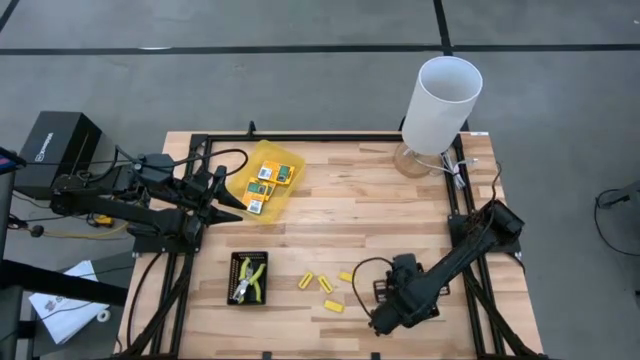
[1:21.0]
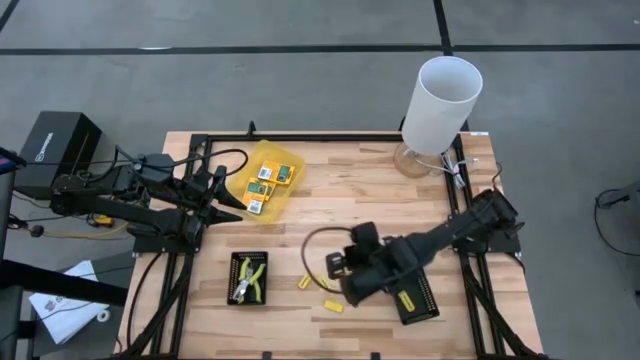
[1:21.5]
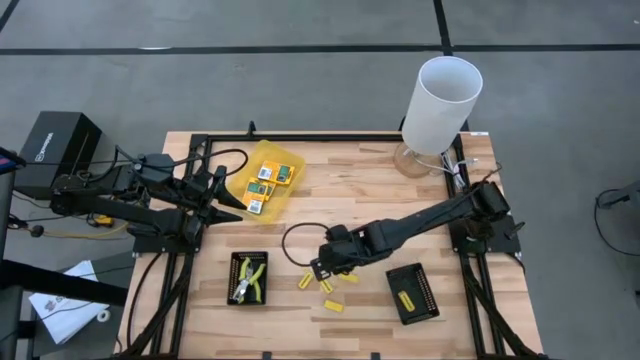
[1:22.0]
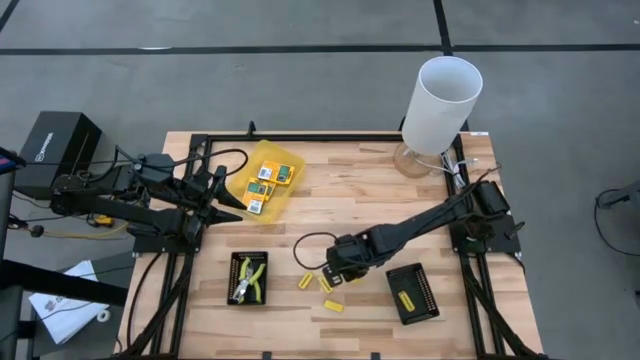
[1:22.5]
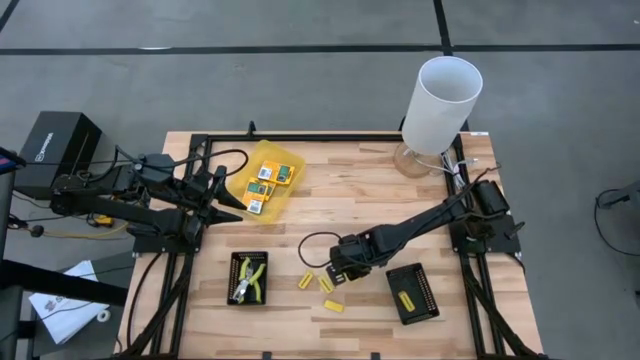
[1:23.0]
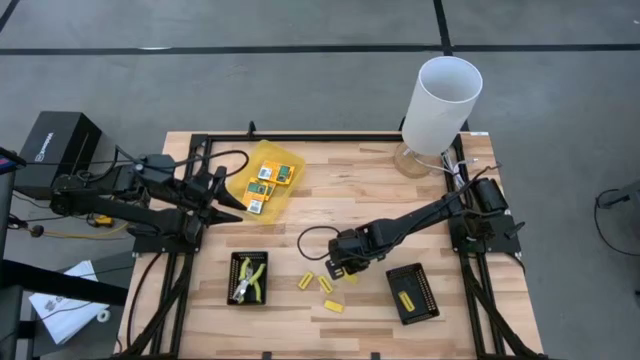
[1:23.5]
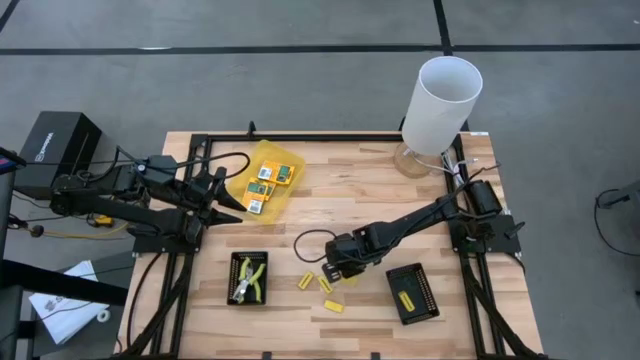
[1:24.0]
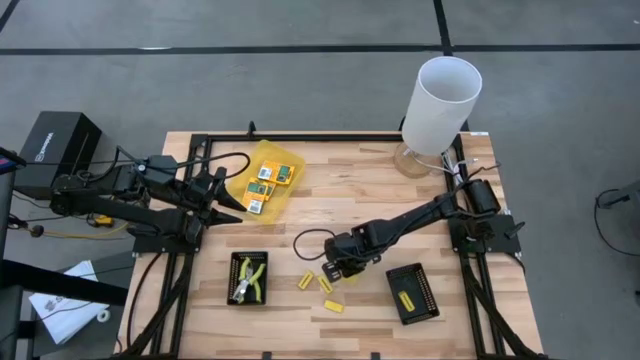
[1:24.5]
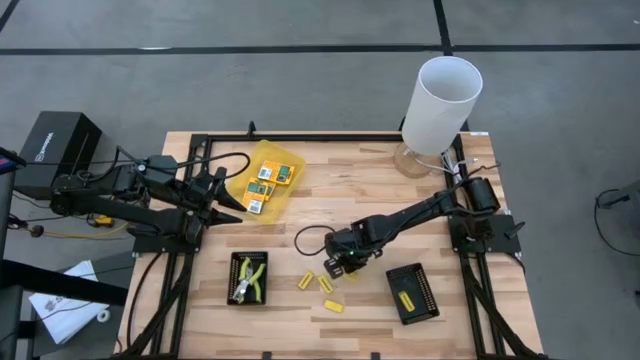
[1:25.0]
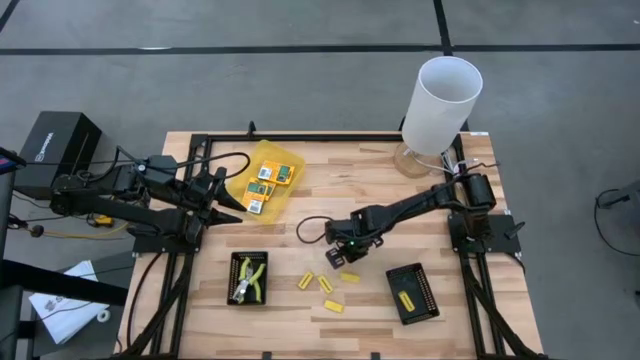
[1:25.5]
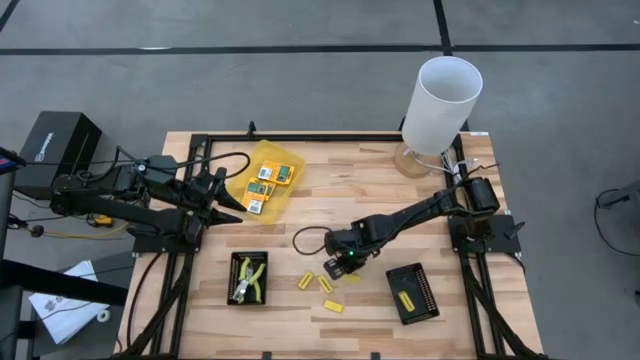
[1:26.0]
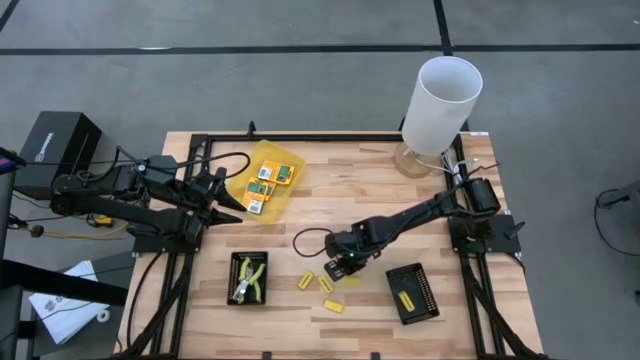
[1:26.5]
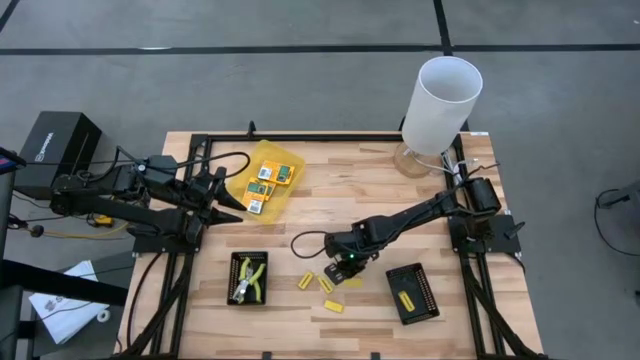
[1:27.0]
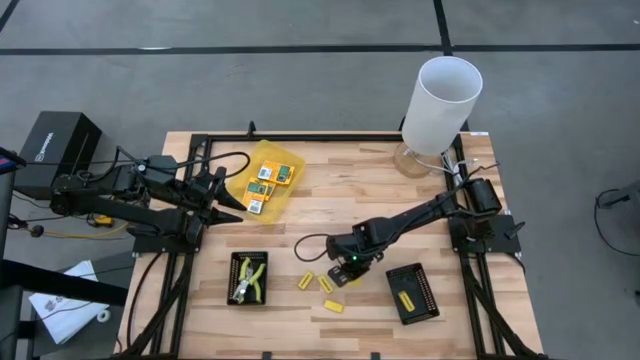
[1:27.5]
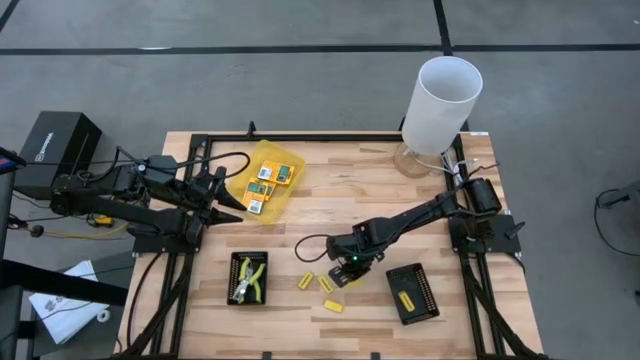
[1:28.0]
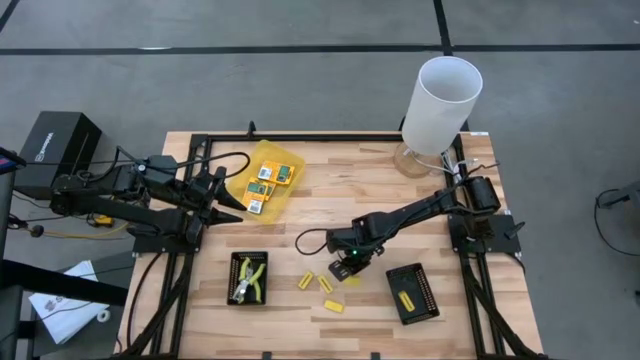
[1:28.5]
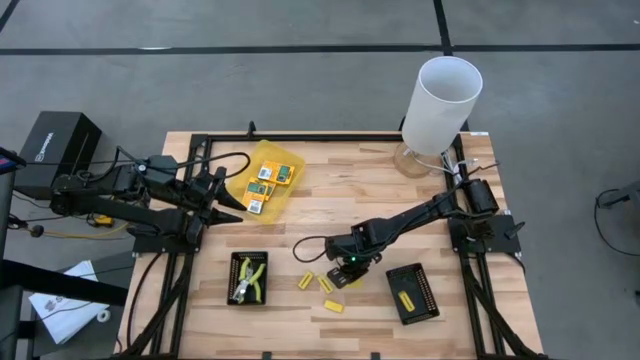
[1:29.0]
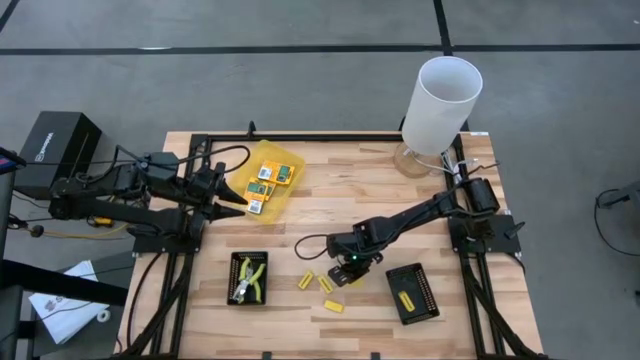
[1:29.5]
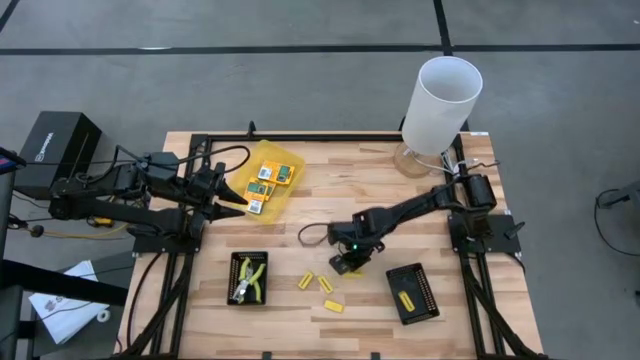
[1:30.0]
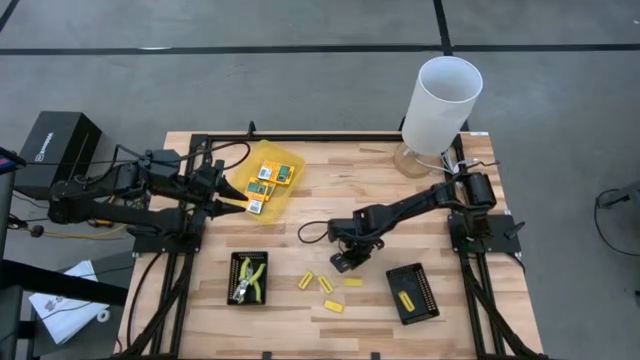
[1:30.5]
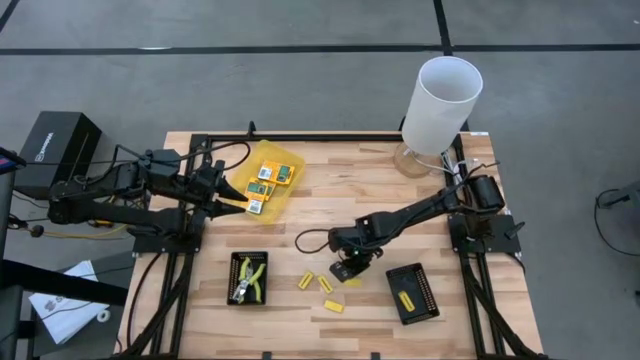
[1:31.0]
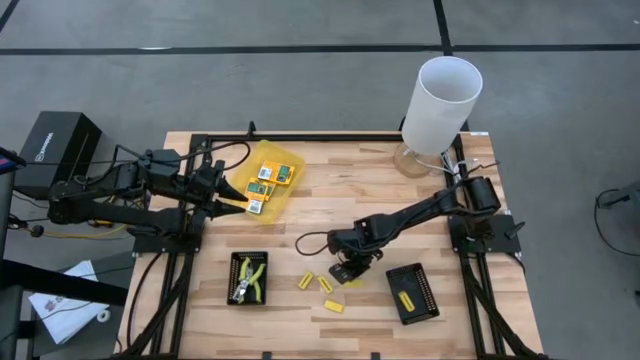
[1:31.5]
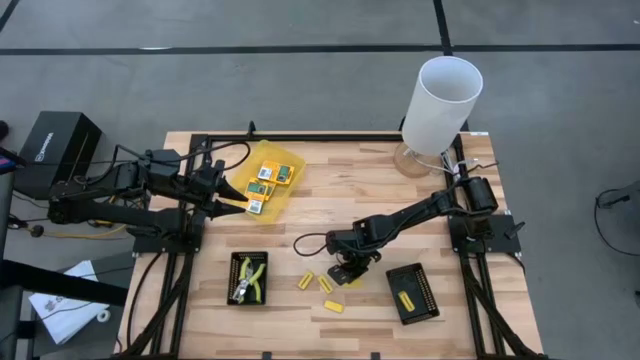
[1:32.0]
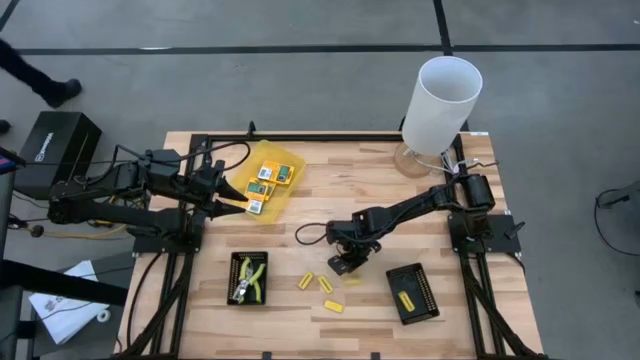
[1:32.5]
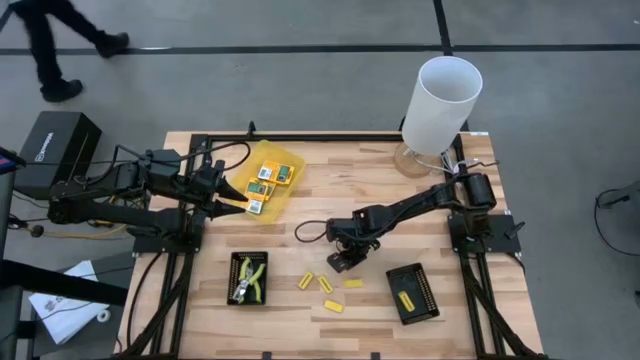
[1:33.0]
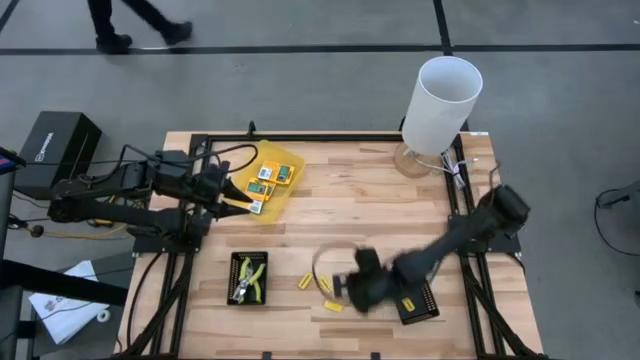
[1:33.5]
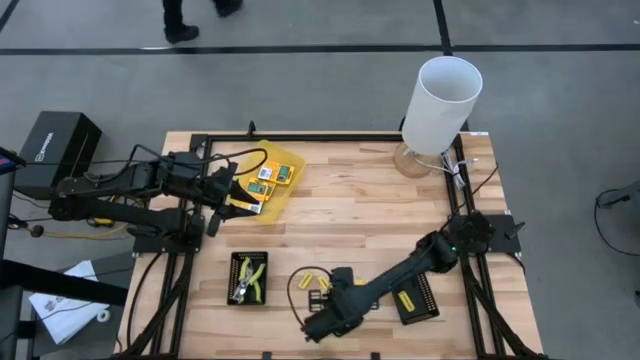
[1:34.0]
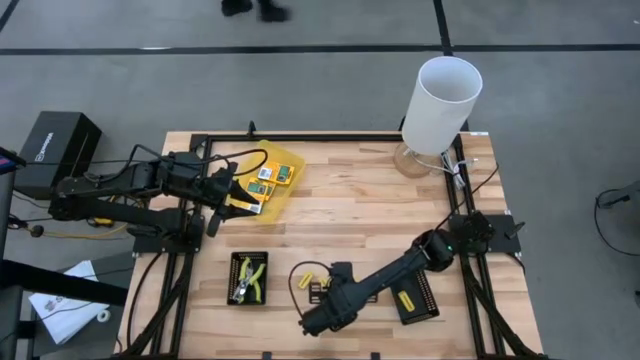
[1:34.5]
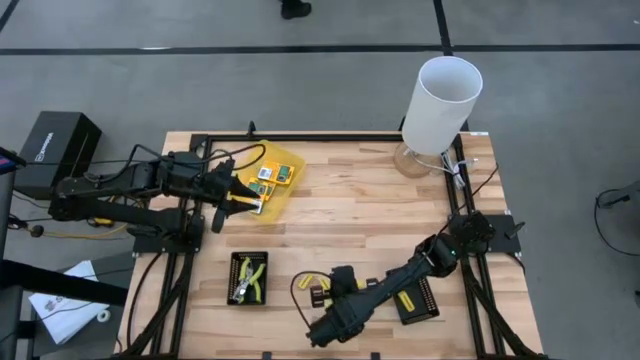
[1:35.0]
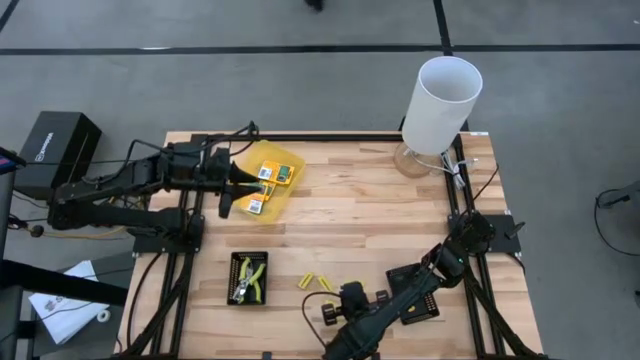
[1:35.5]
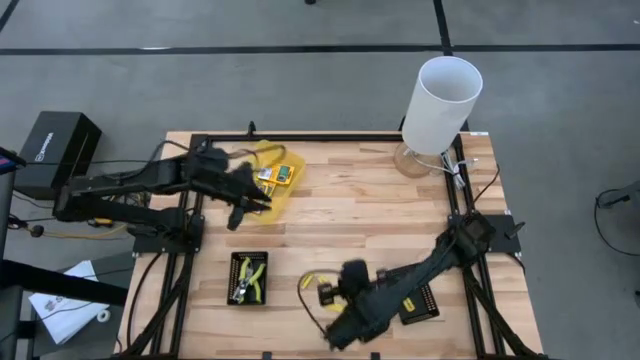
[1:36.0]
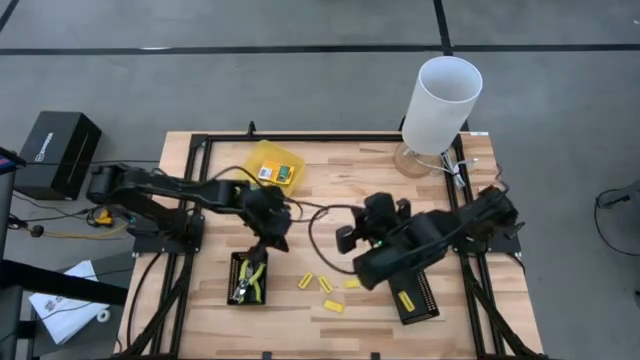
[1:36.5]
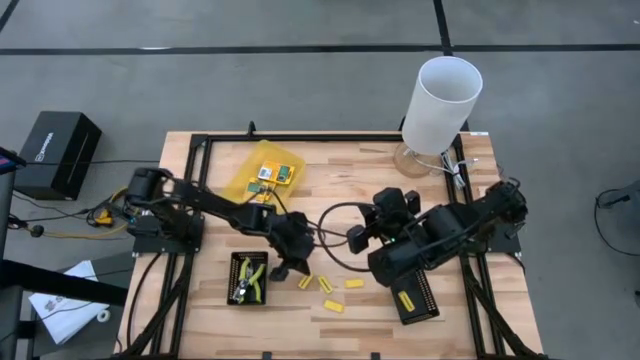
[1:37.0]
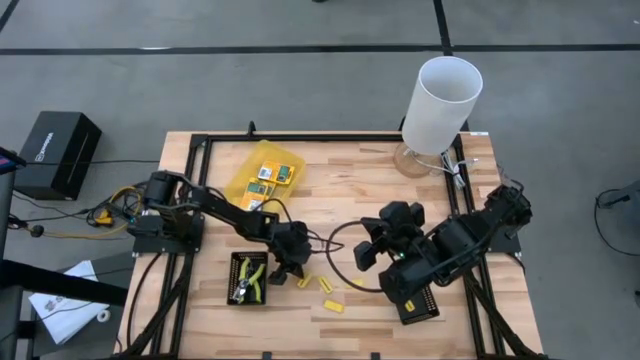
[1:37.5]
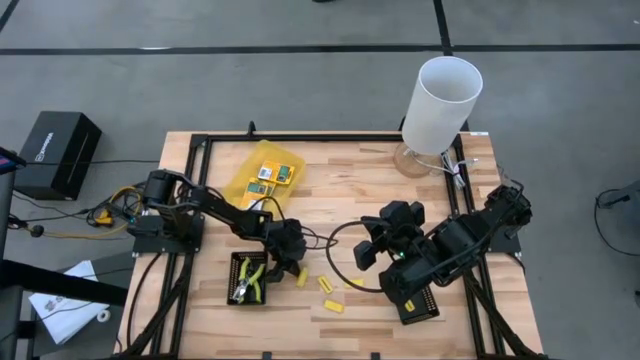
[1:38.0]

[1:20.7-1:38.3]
Task: Pick & Place School Supplies
Put the yellow eraser into the right black bin

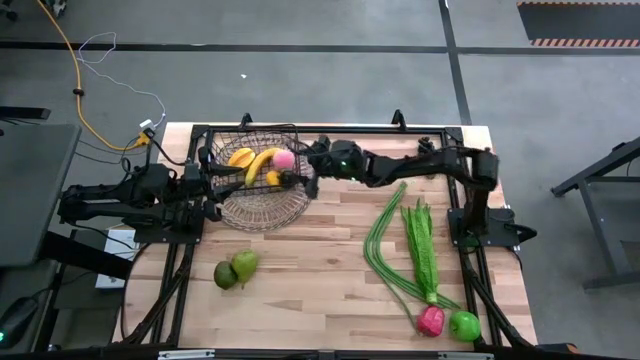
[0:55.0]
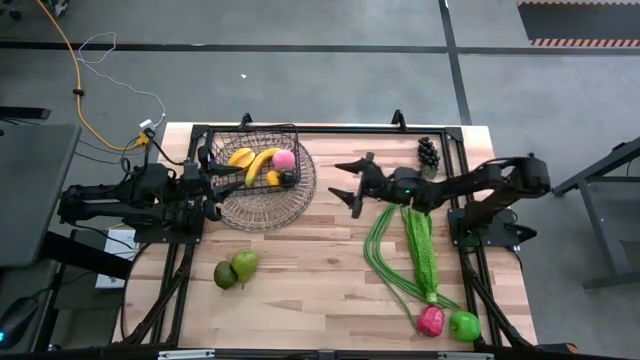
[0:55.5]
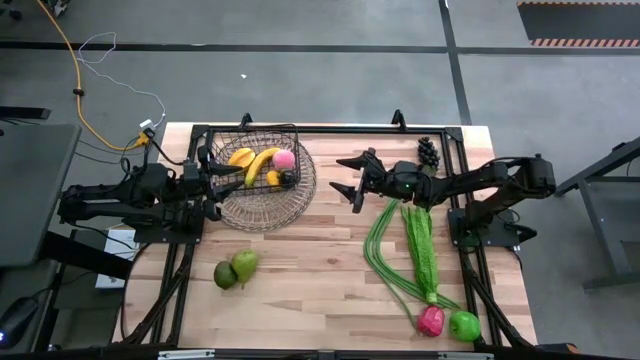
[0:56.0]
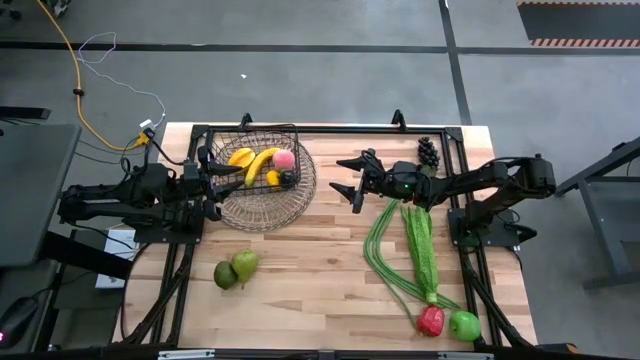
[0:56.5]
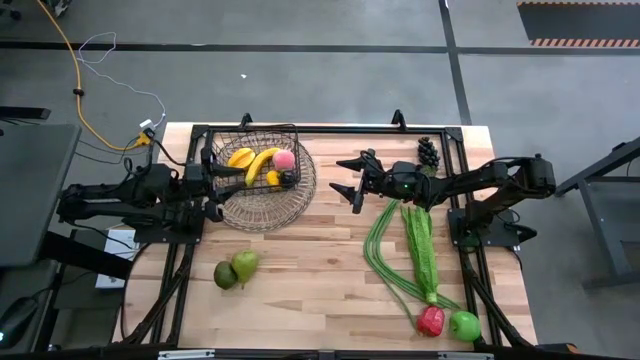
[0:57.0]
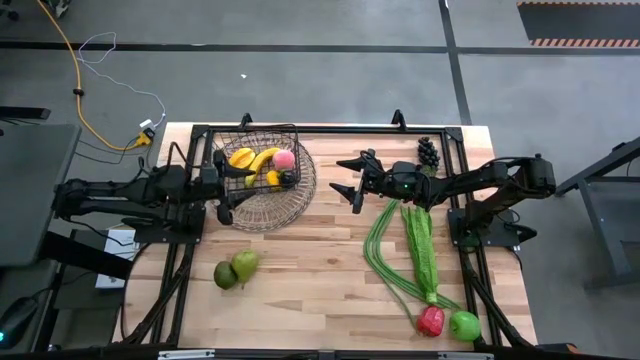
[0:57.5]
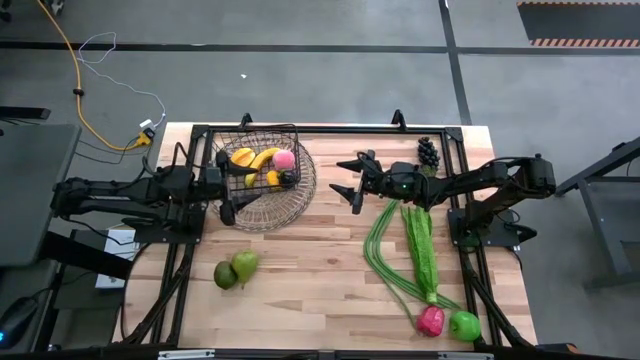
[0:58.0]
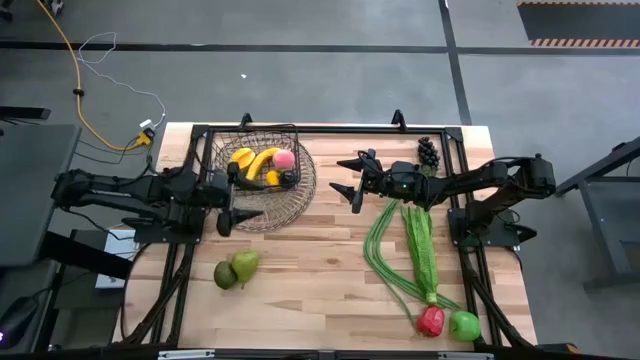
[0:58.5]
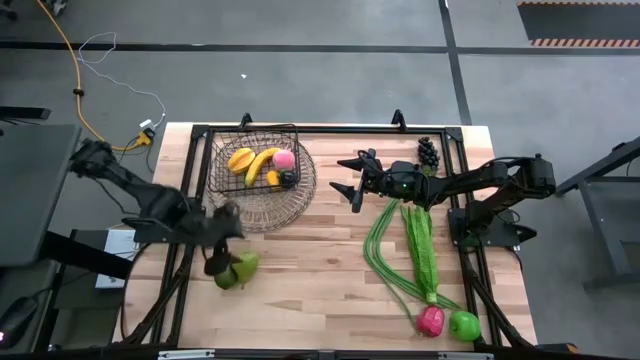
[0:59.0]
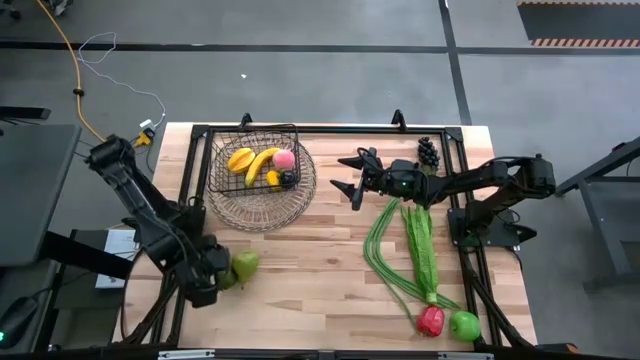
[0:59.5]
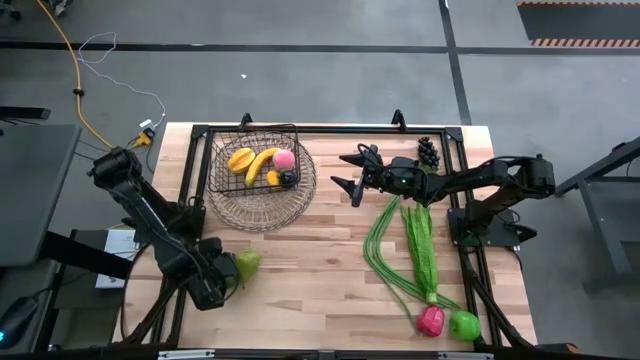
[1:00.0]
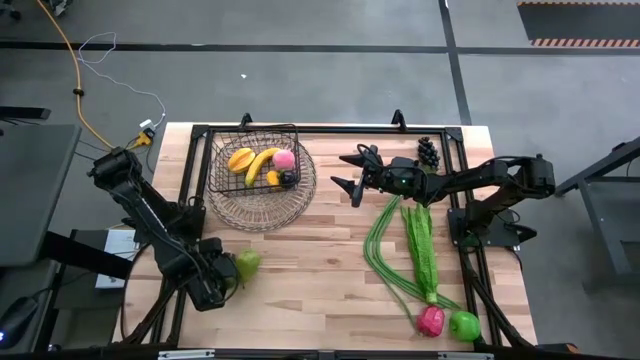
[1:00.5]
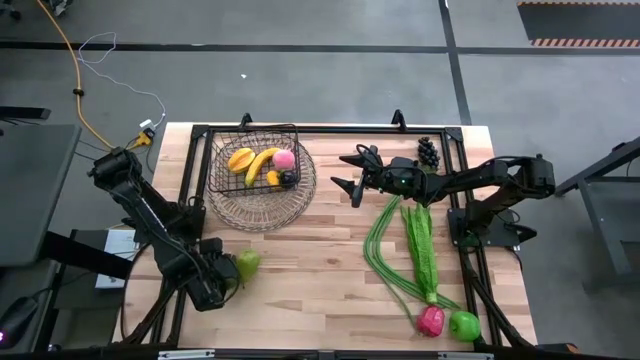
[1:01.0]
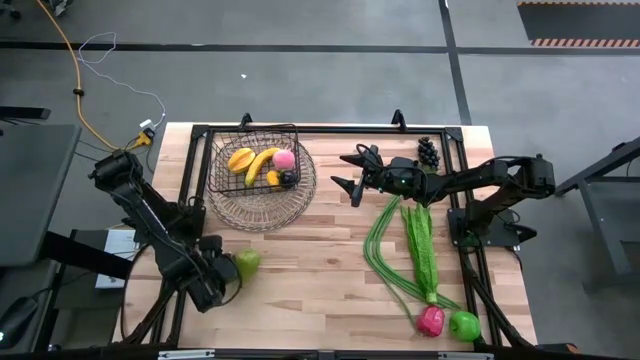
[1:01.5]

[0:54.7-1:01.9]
Task: Build produce basket
Put the green lime into the wire basket
